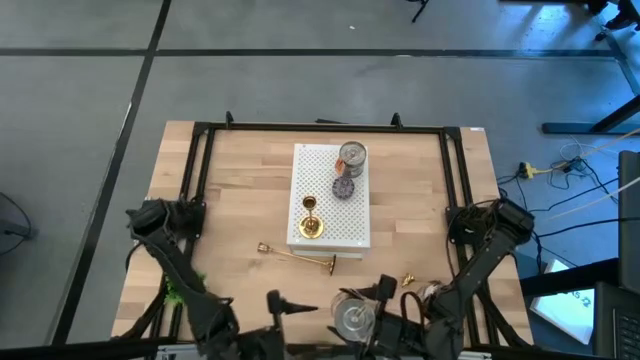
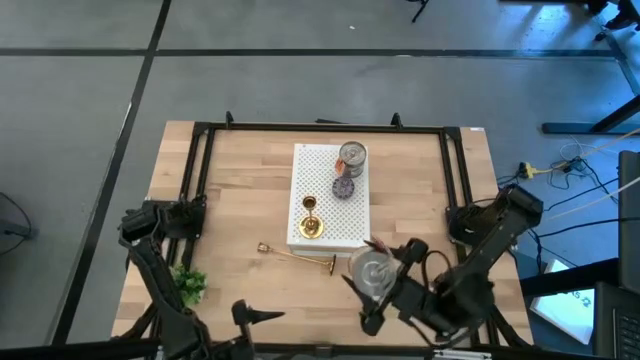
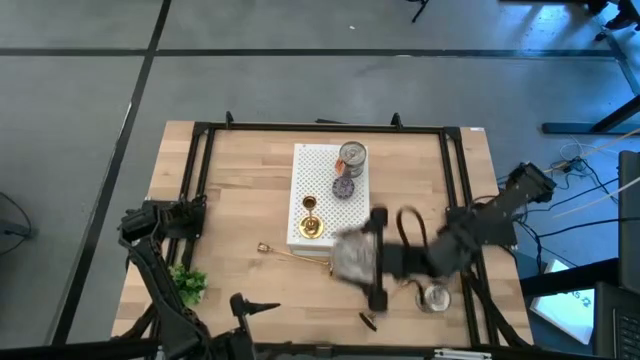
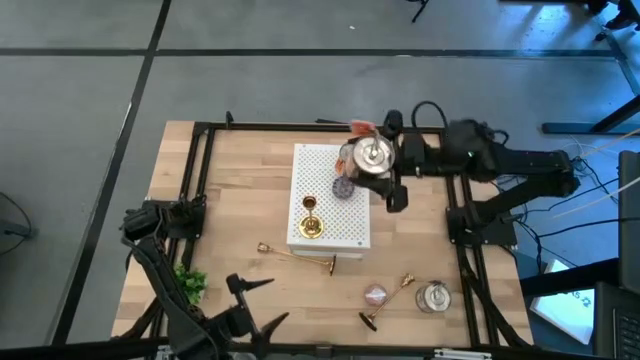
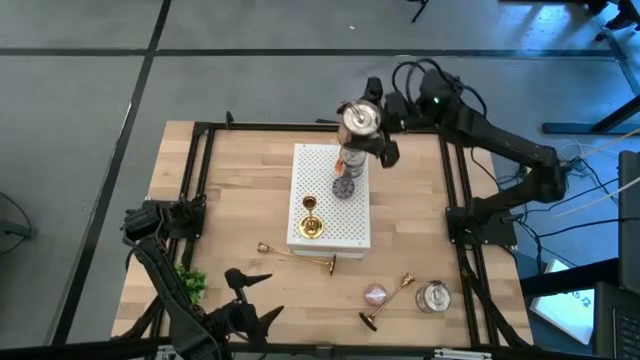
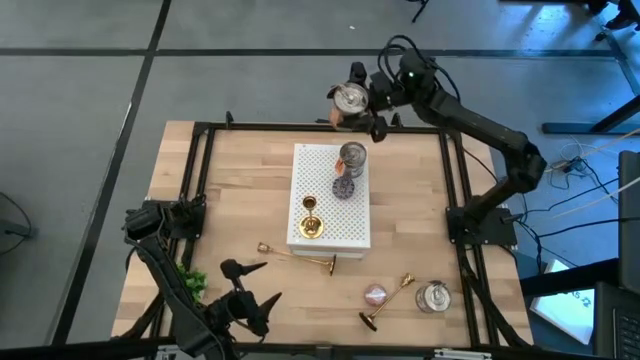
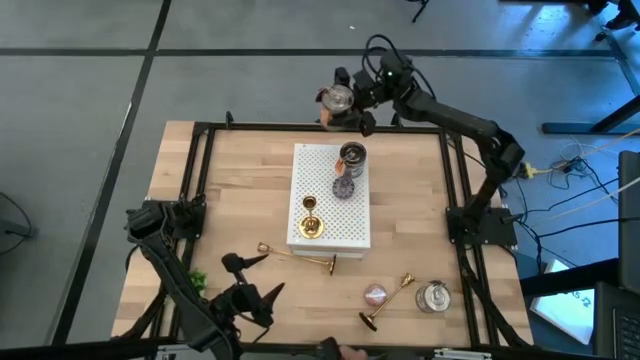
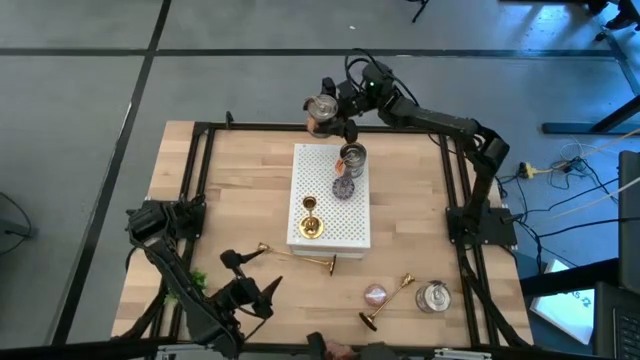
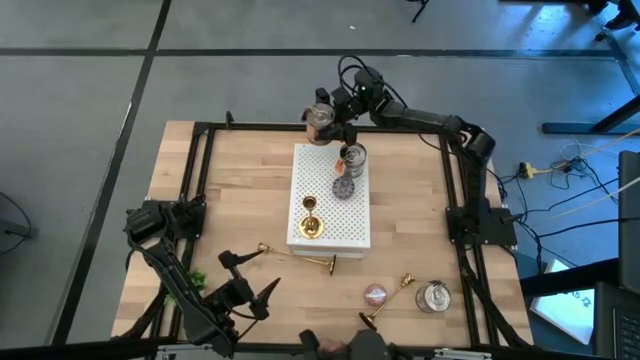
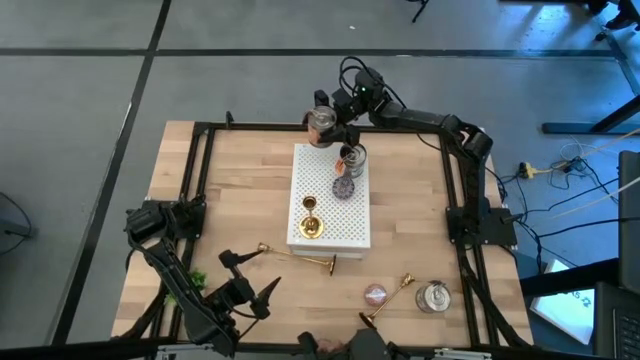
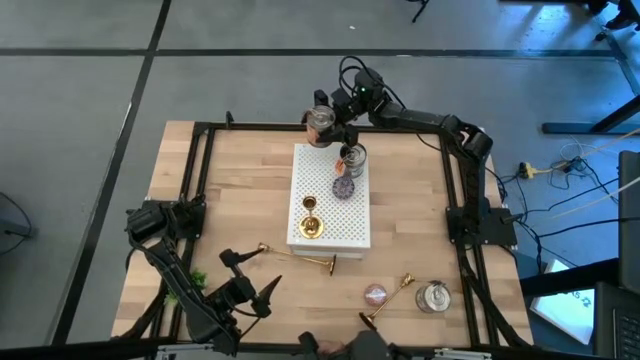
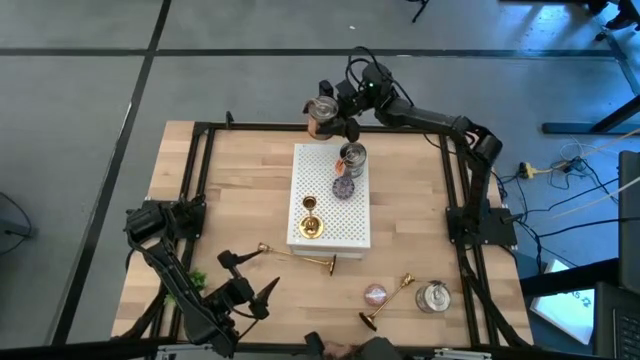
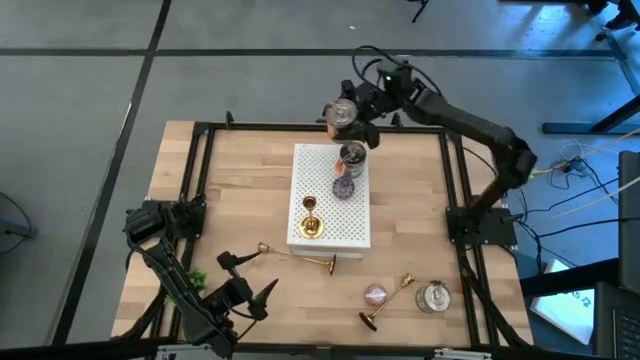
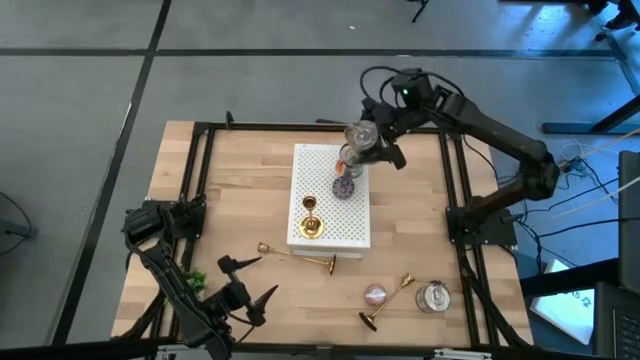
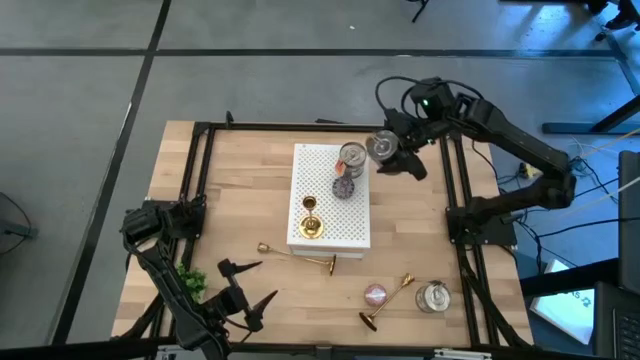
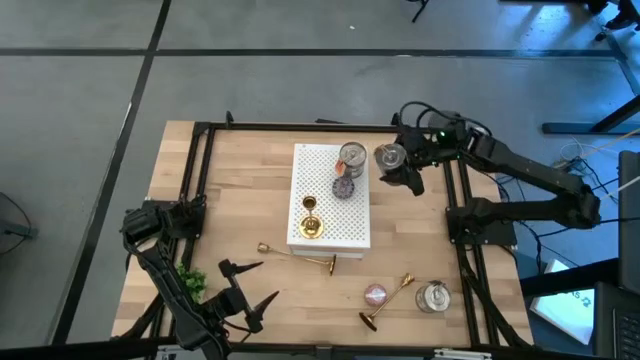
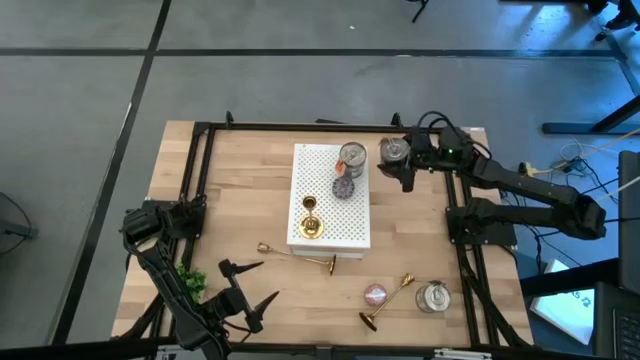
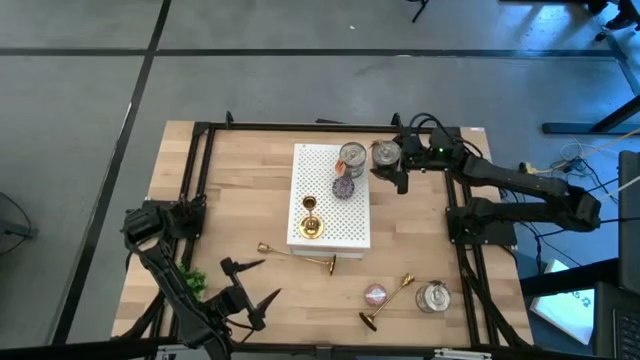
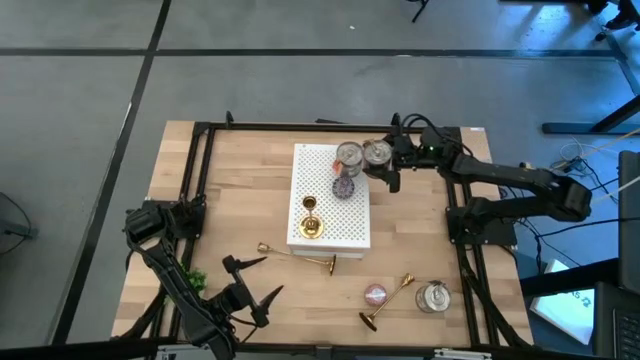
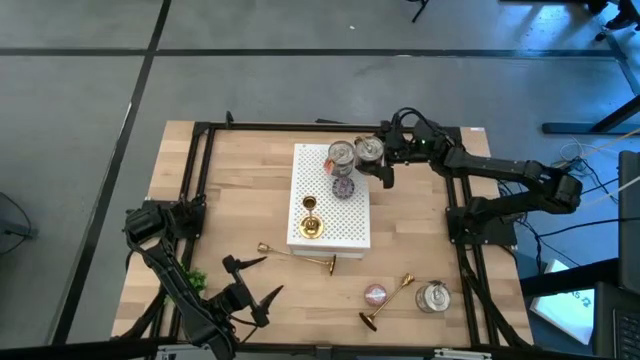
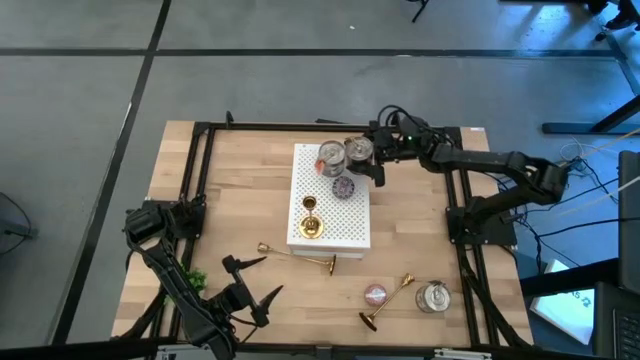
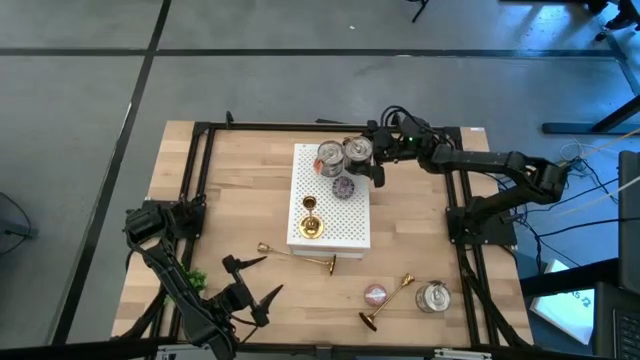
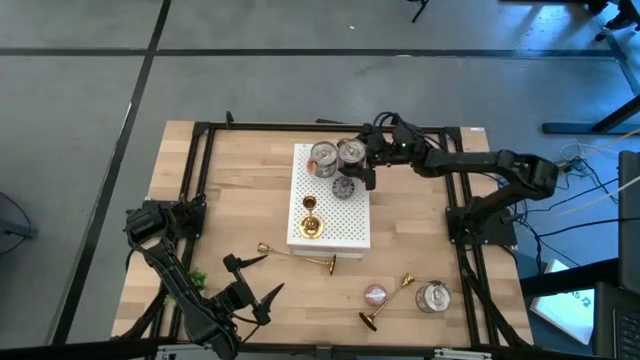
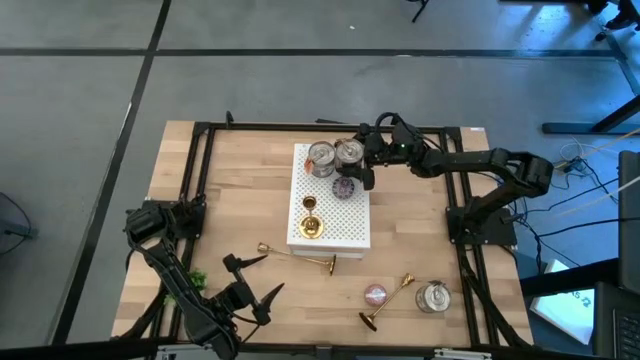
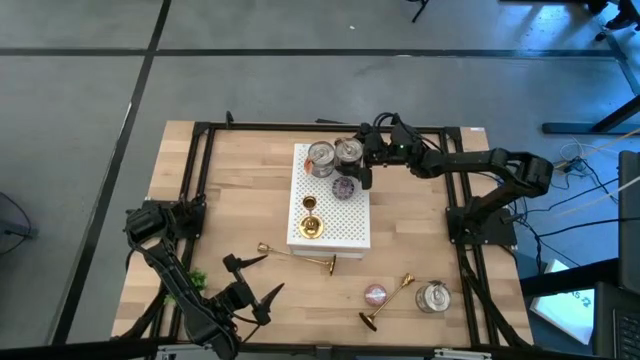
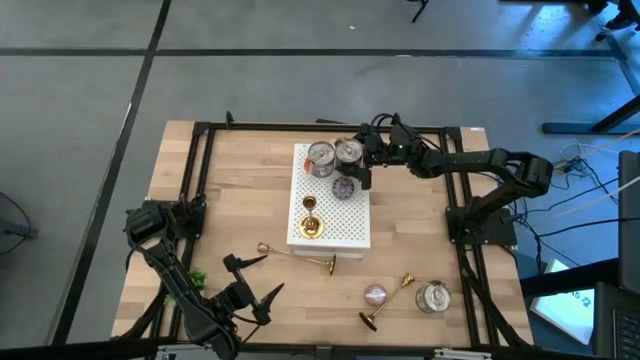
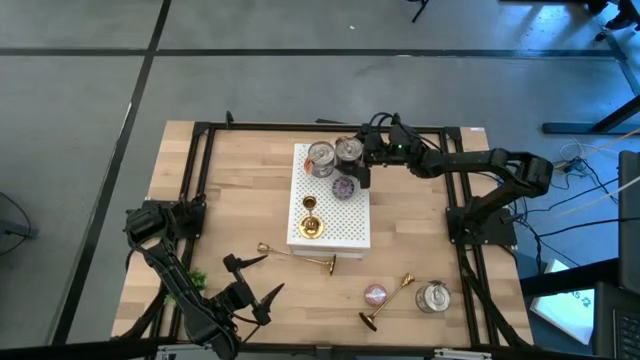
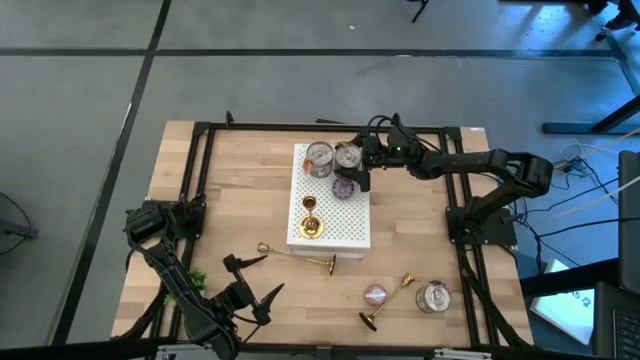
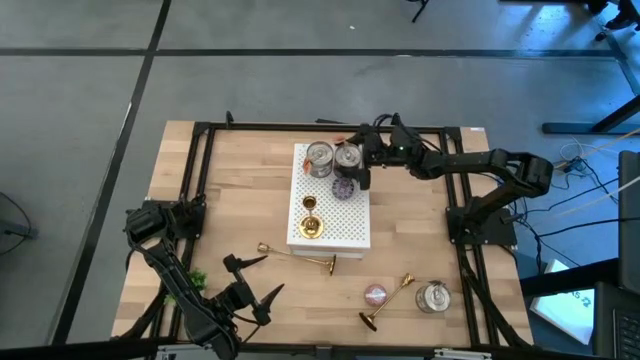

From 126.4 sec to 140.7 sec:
Task: Pick & Place candle stick holders
Put the left silver scented candle on the shelf

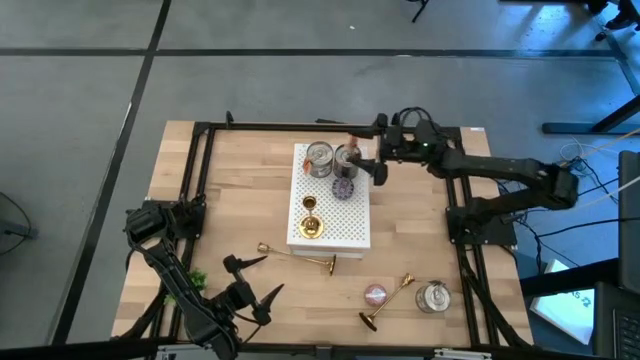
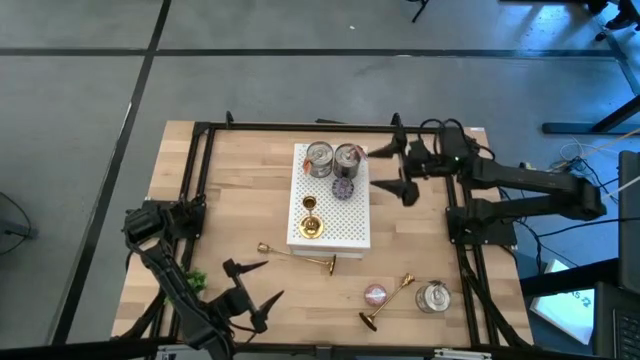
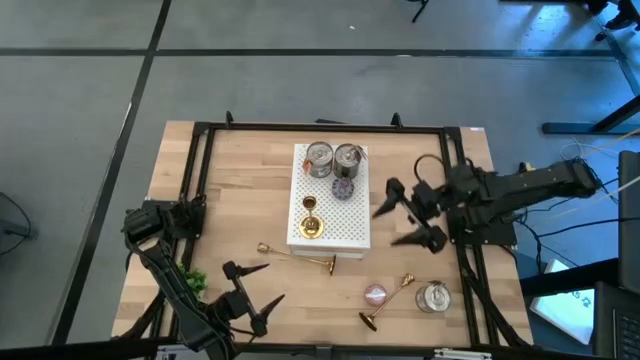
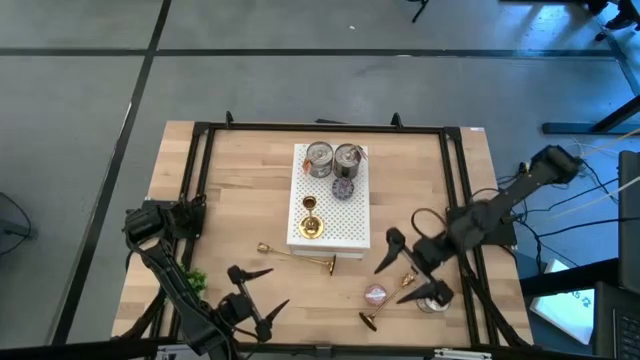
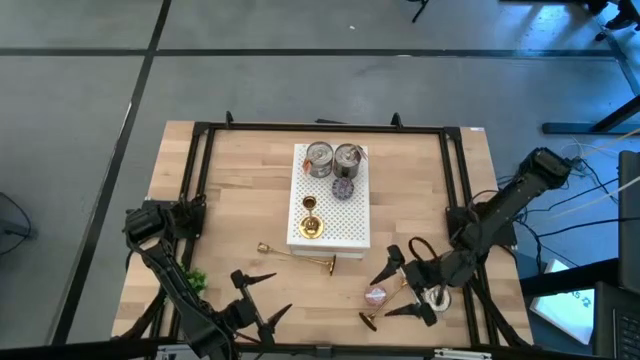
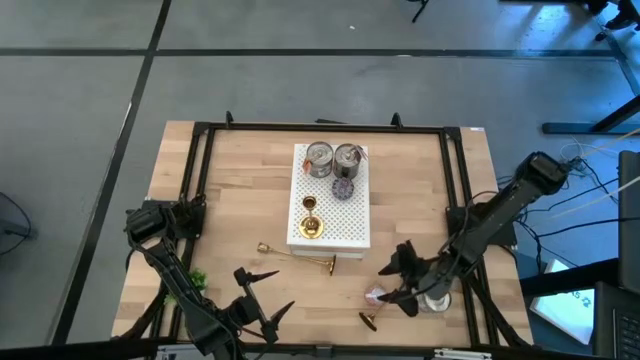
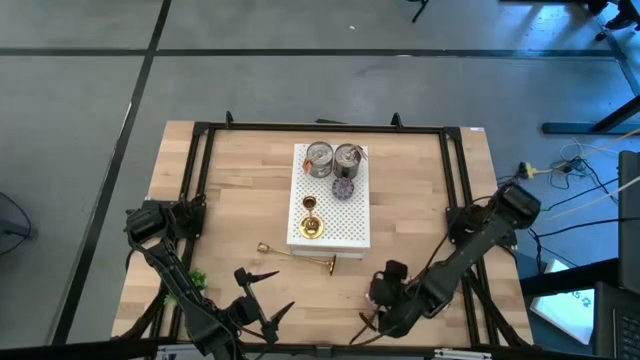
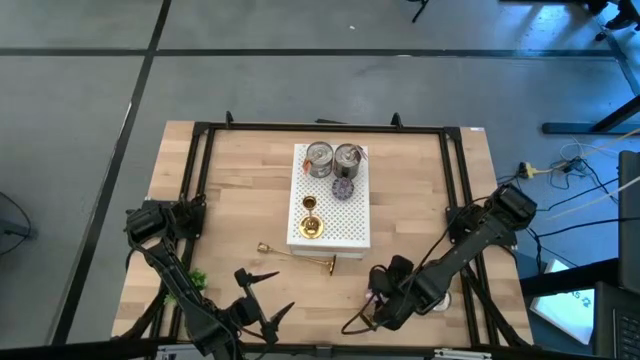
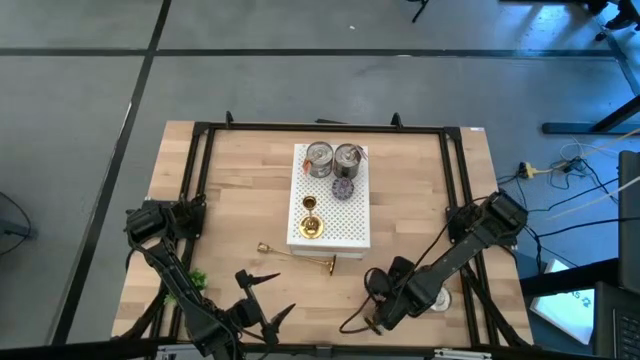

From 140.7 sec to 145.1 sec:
Put the pink scented candle on the shelf

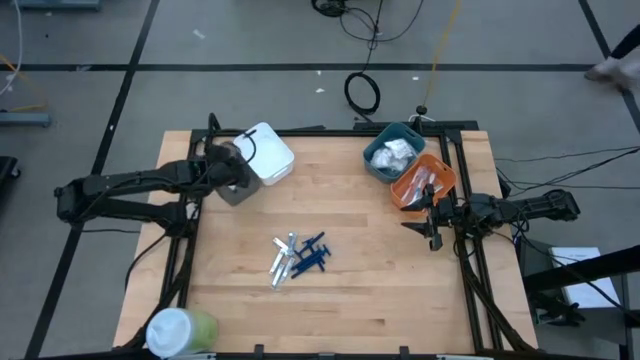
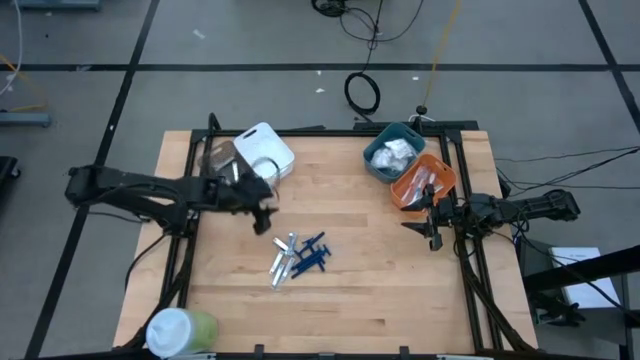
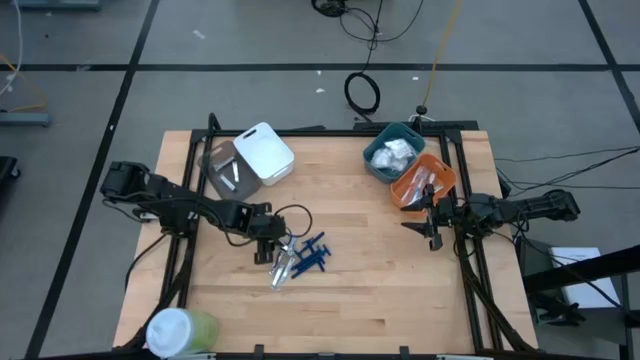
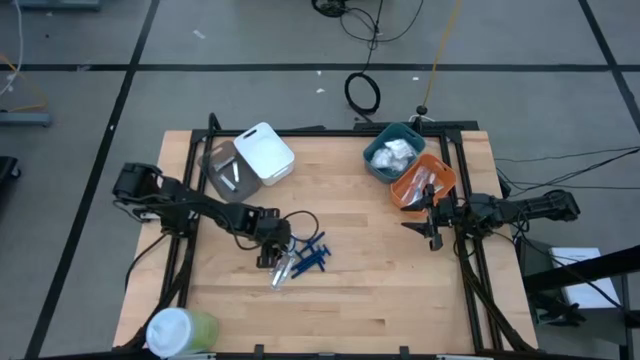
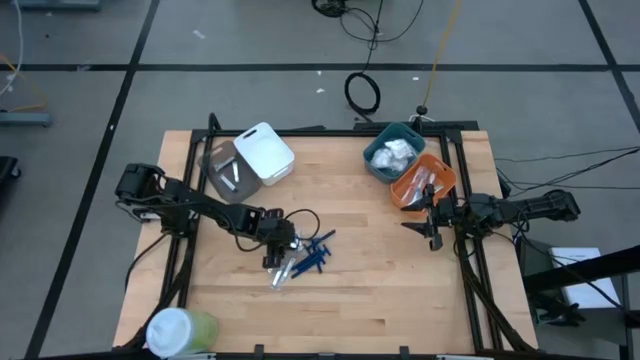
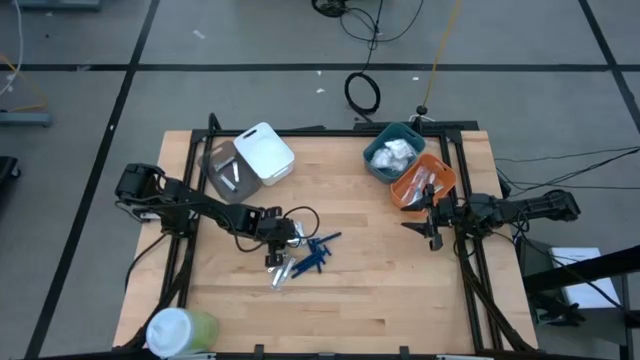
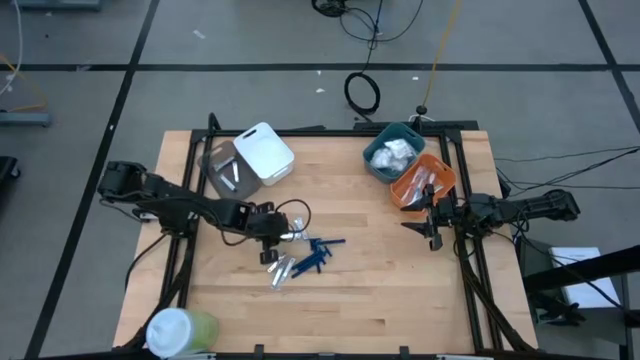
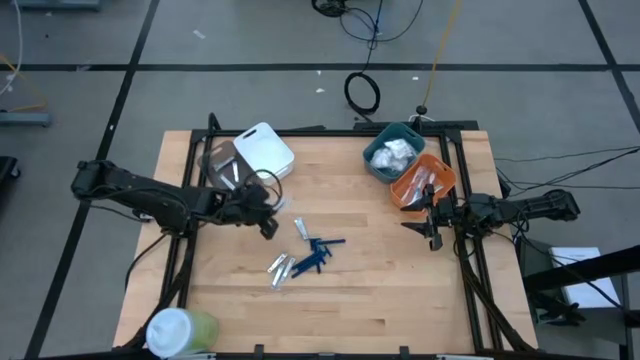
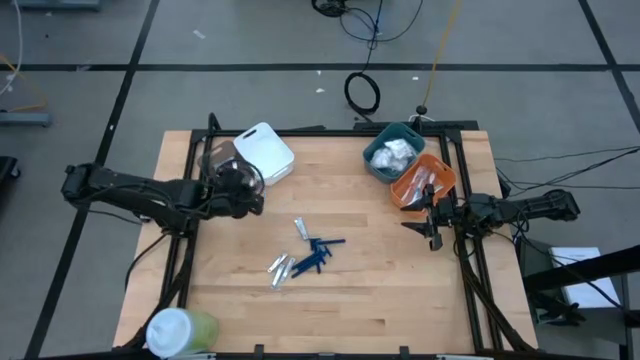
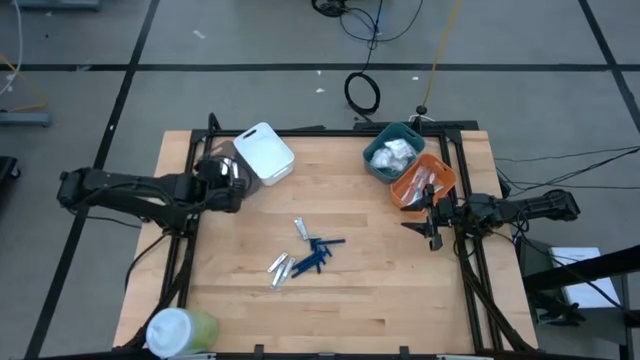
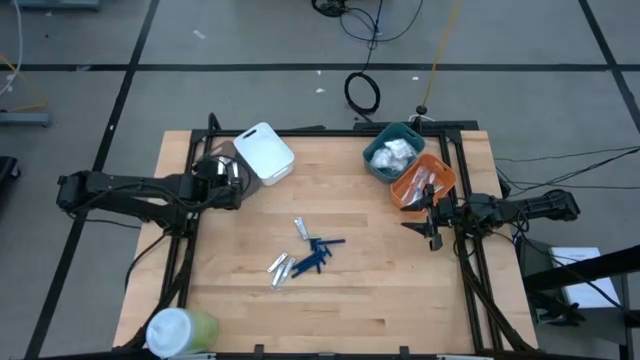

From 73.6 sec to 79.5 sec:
Task: Pick & Place Travel size toiletries
Put the silver nail cutter into the black bin
